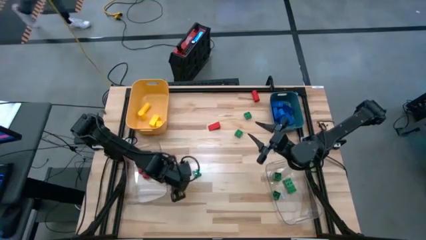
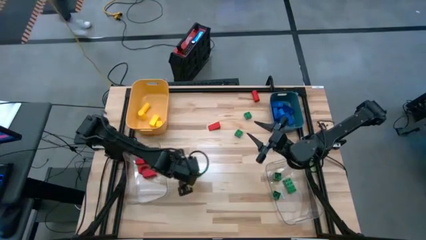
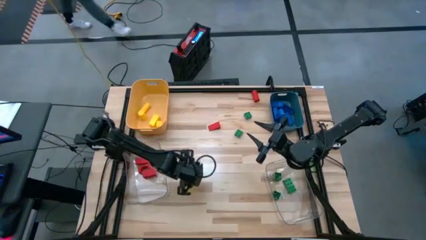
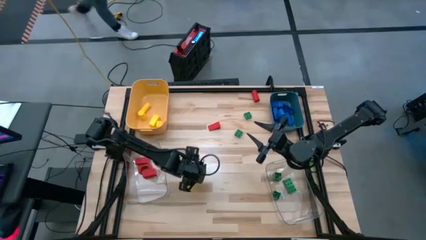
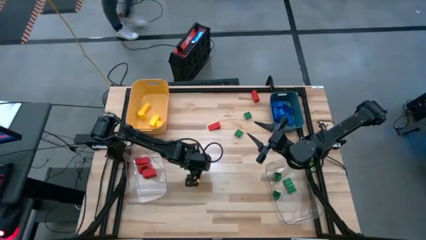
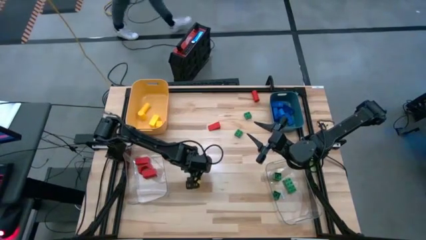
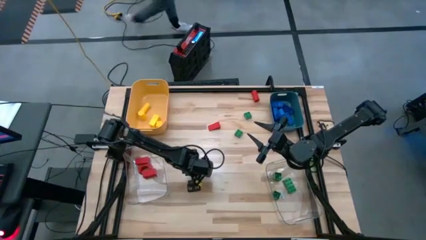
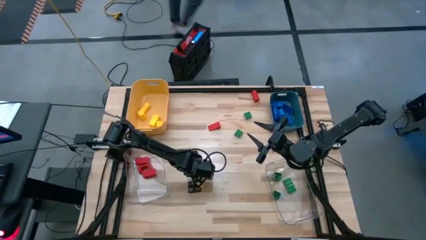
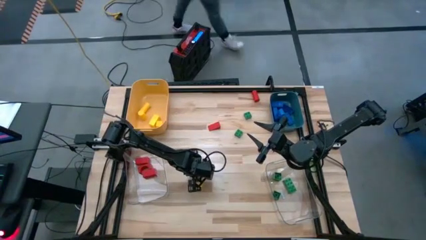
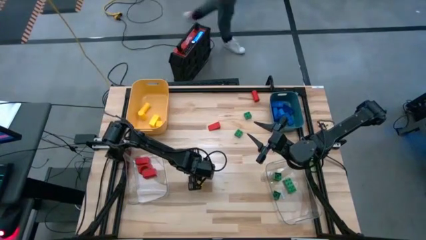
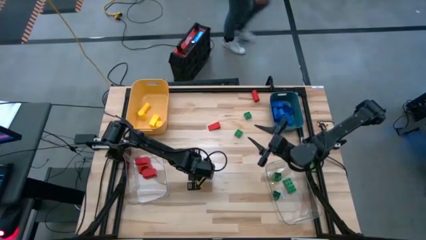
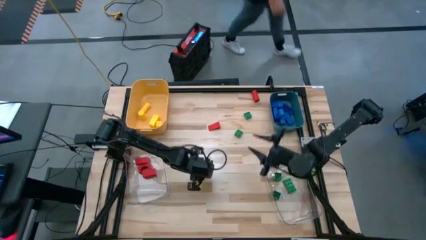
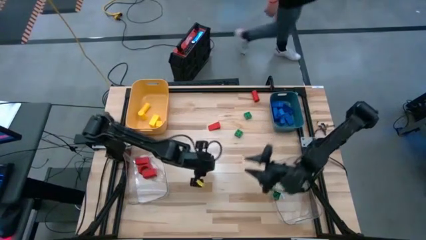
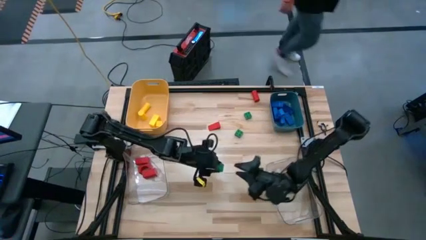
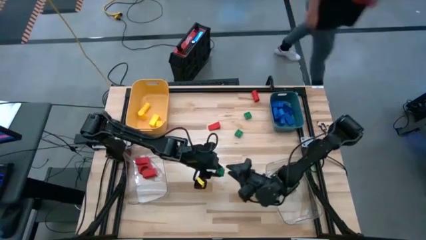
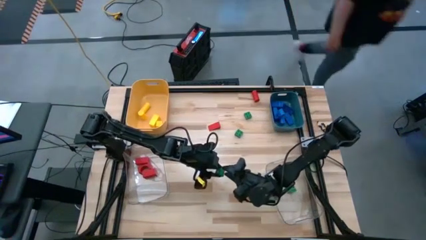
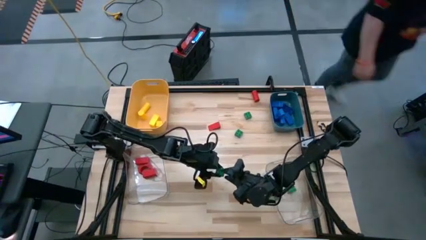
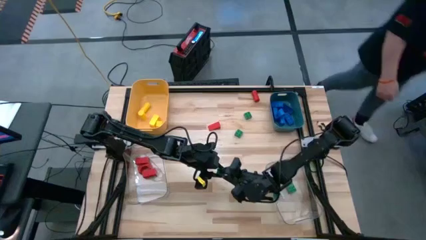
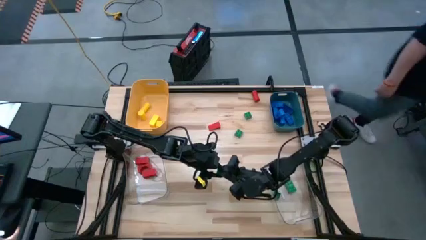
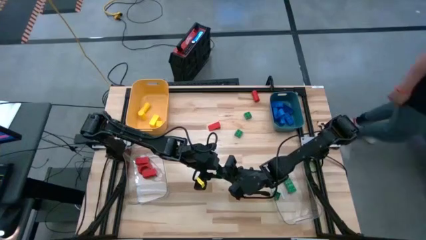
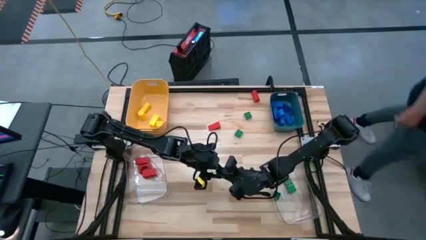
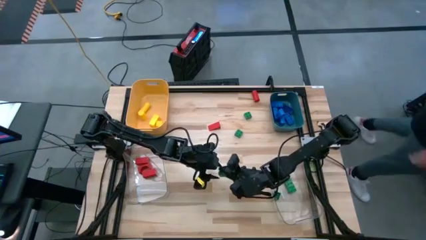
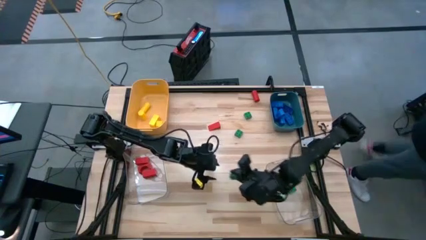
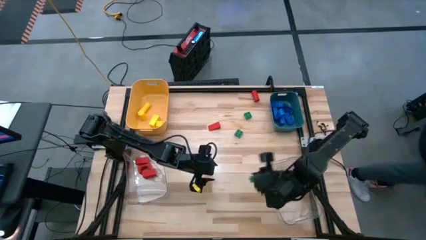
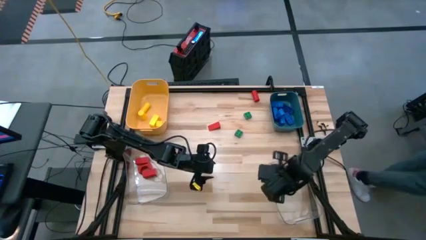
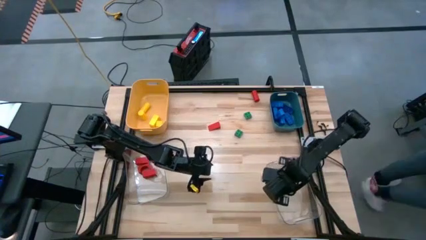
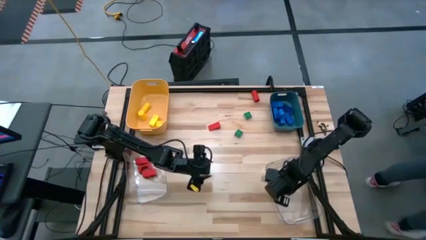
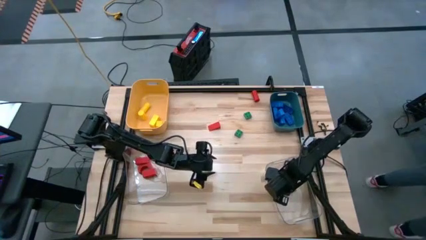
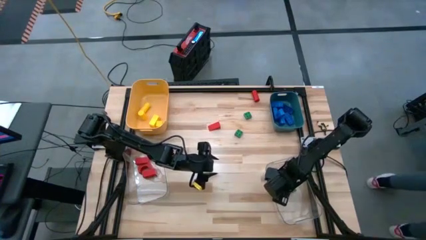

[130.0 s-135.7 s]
Task: Sort blocks
Put the green game piece into the right transparent bin

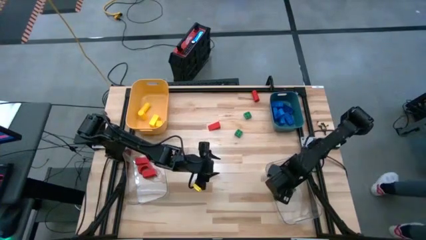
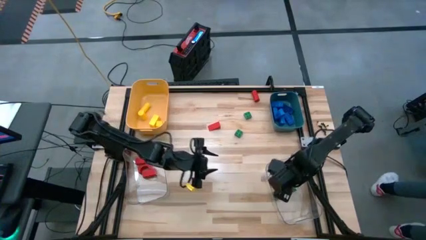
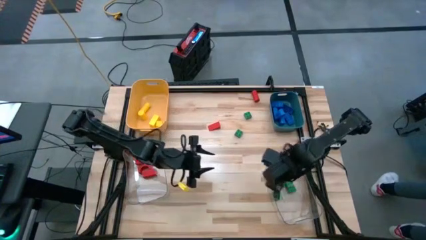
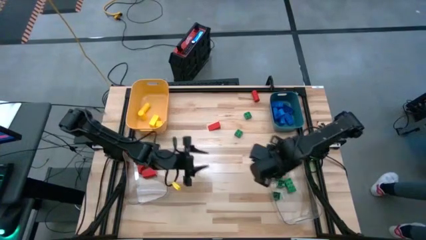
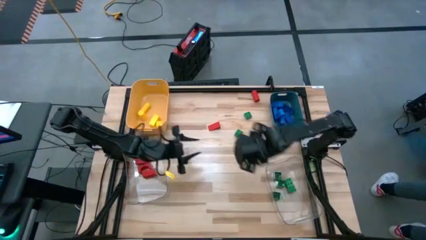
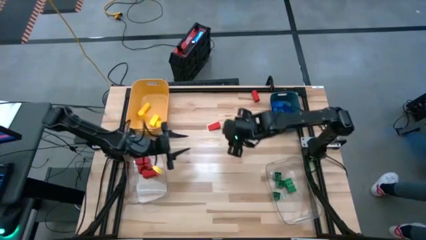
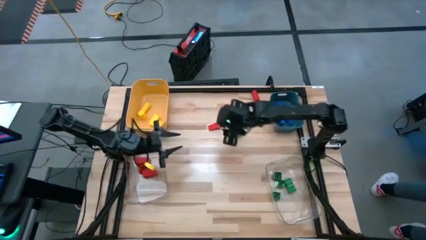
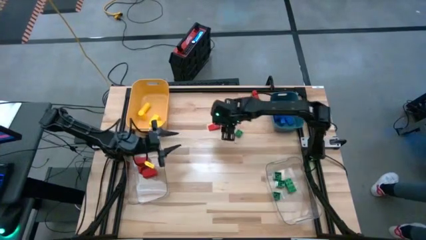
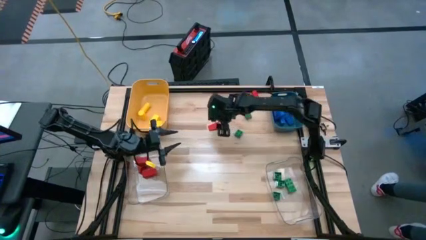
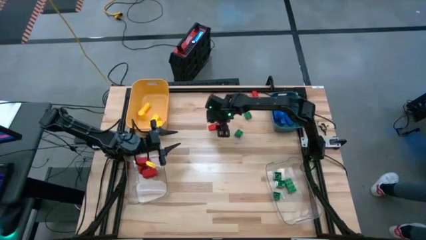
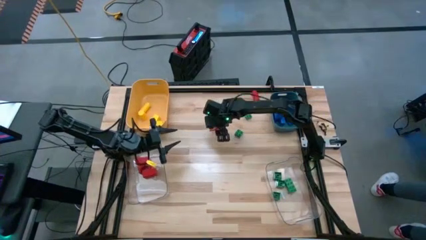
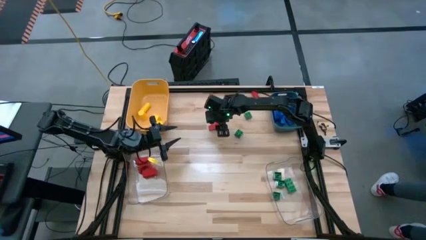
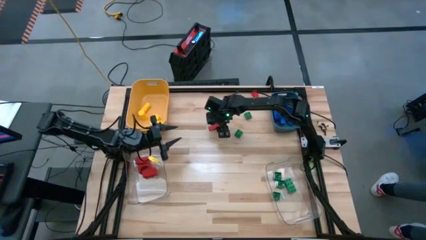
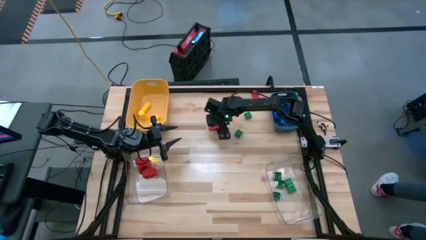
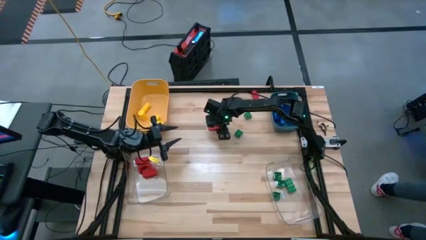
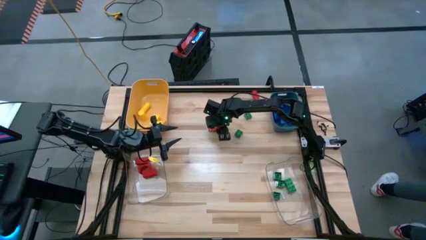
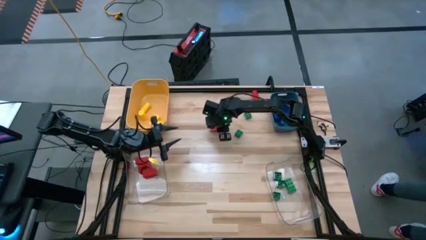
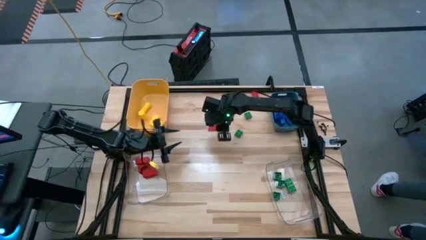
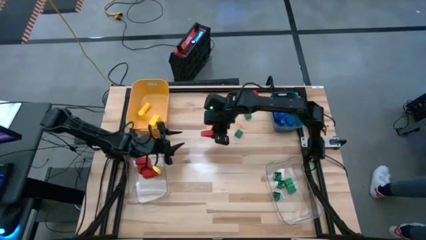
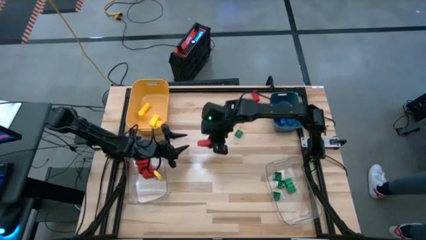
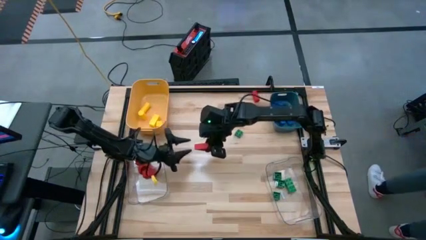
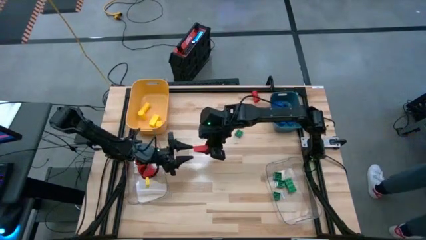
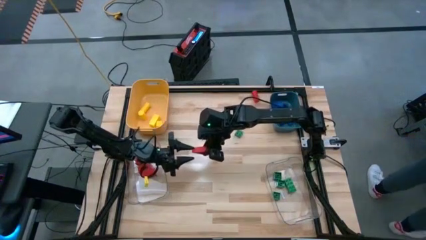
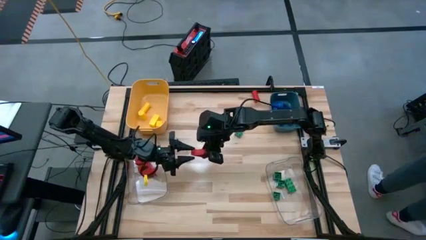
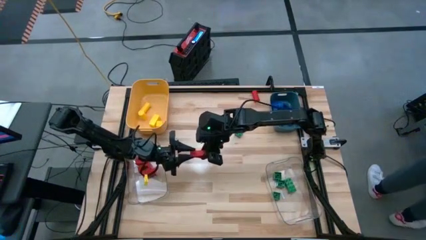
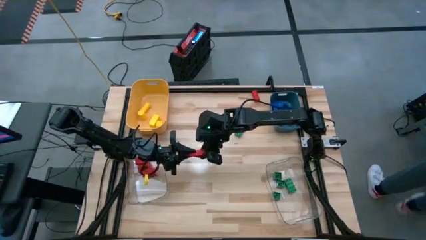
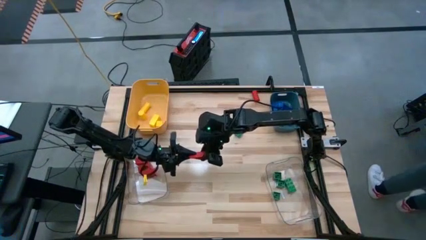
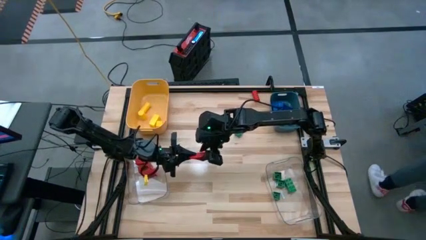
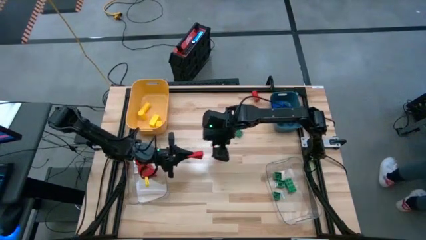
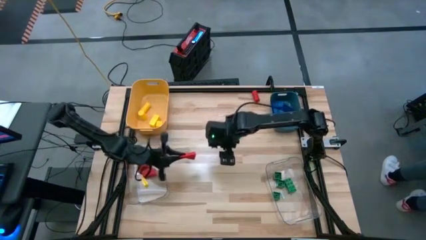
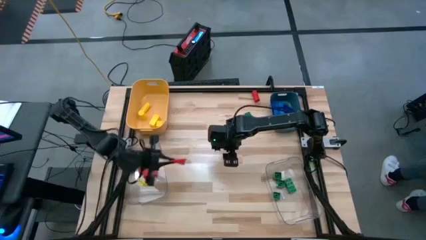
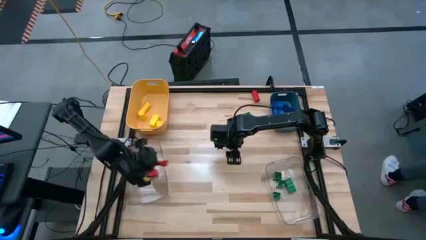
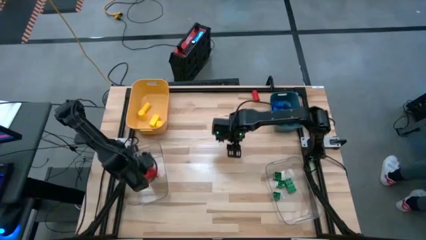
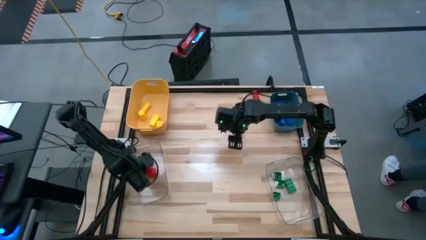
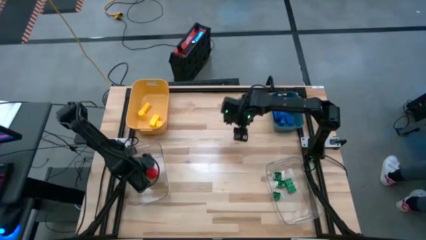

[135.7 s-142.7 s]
Put the red wooden block into the left transparent bin

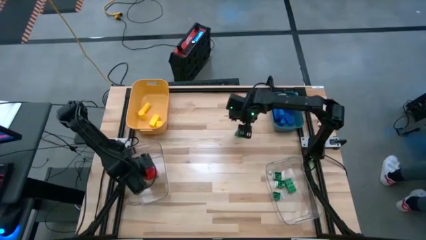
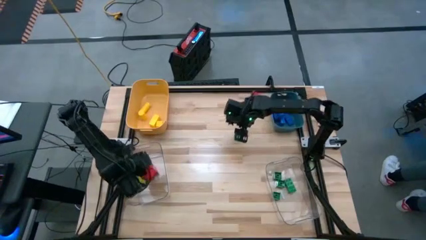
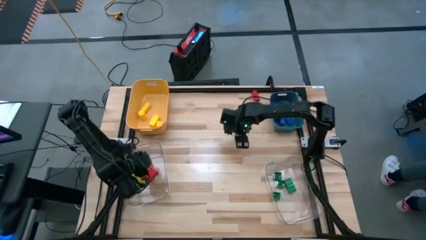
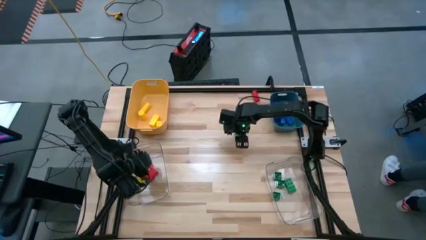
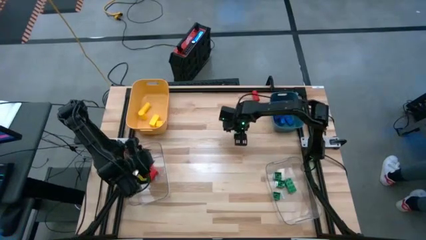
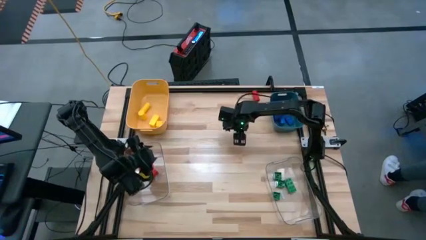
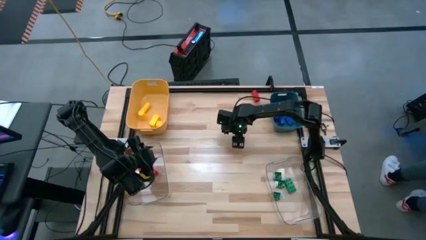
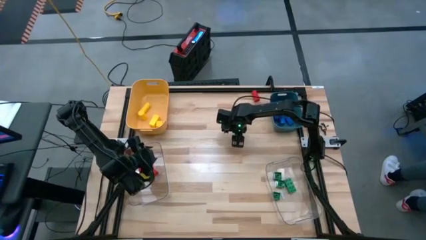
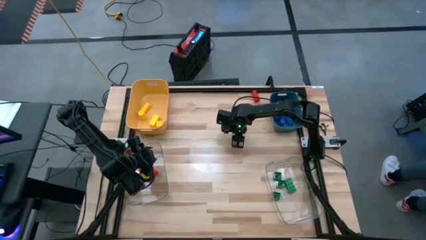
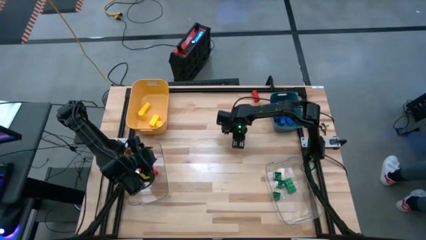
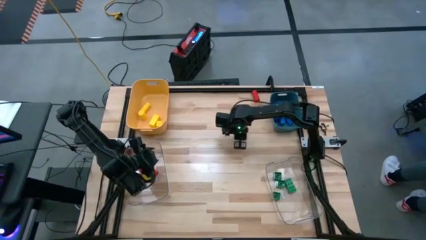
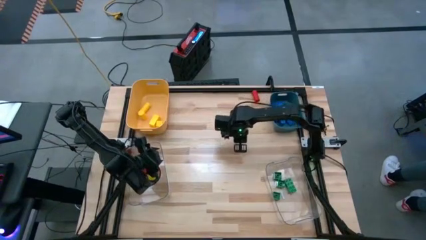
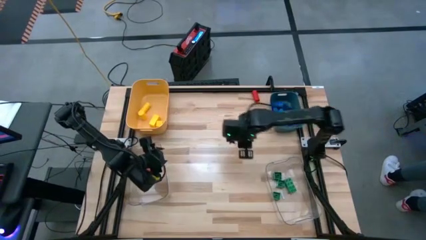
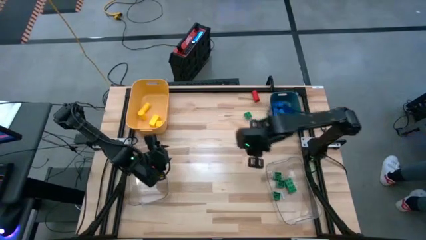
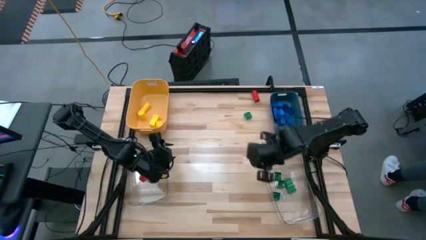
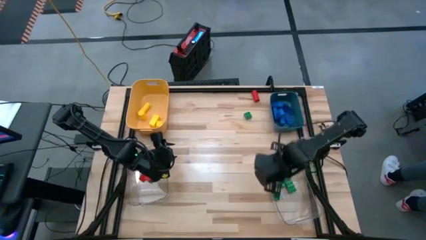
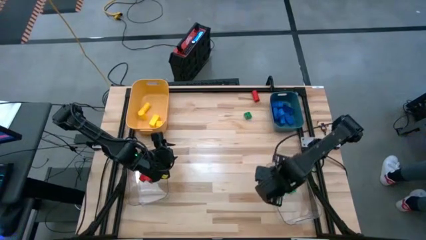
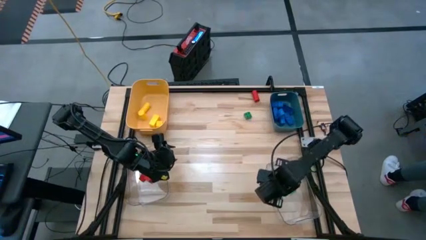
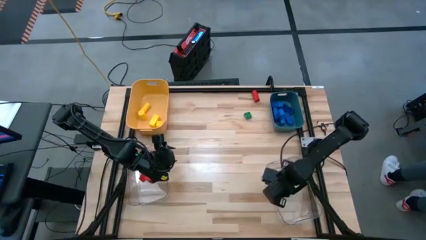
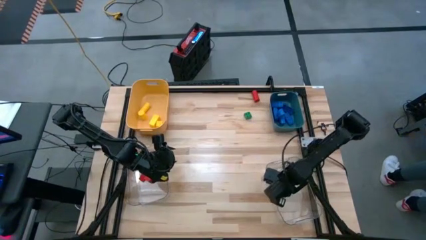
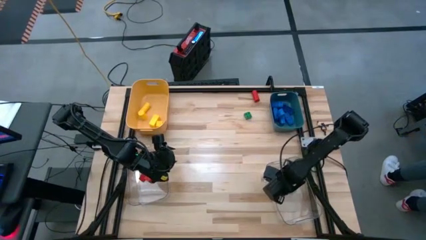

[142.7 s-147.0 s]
Put the green game piece into the right transparent bin
